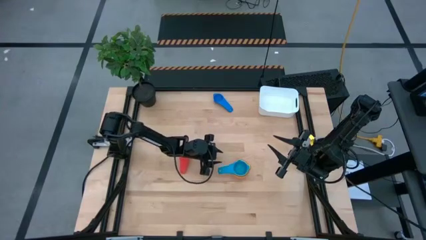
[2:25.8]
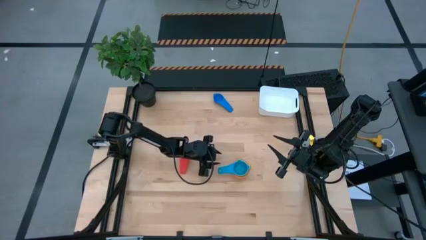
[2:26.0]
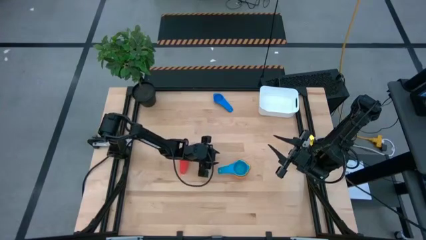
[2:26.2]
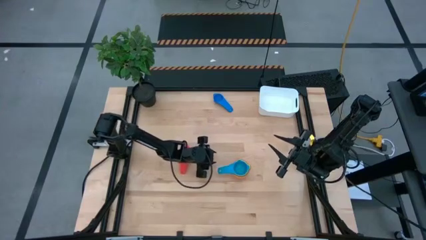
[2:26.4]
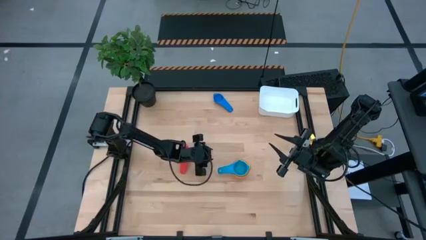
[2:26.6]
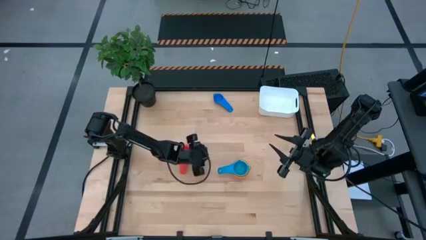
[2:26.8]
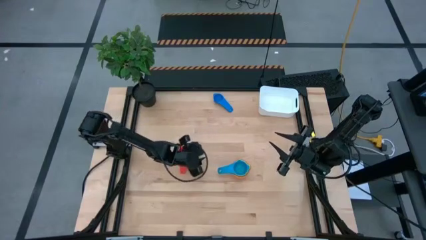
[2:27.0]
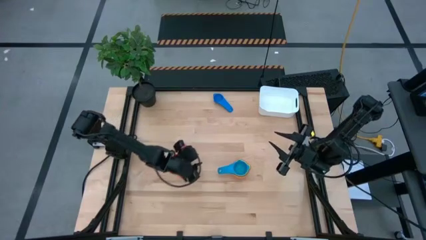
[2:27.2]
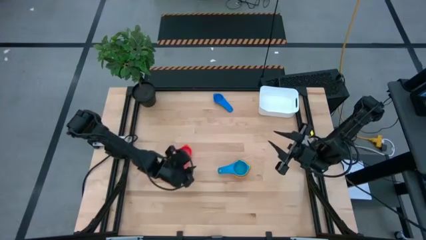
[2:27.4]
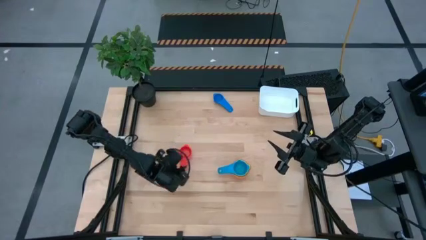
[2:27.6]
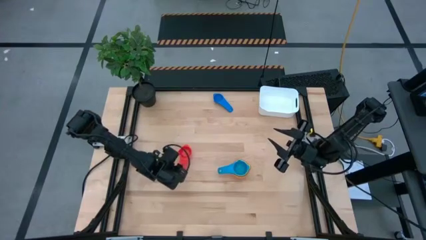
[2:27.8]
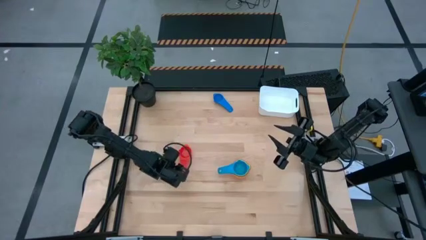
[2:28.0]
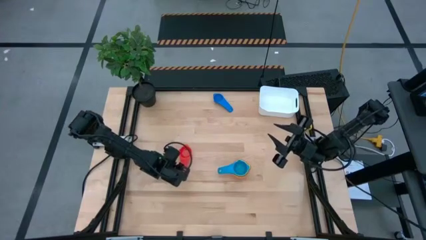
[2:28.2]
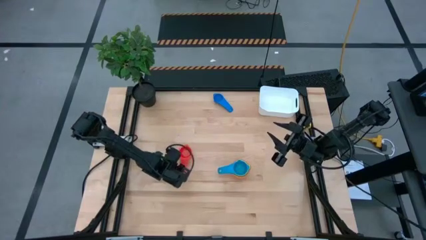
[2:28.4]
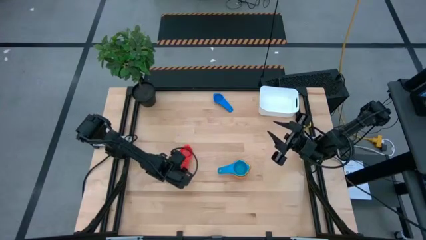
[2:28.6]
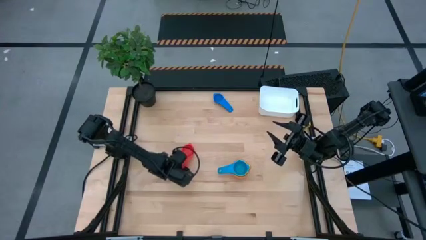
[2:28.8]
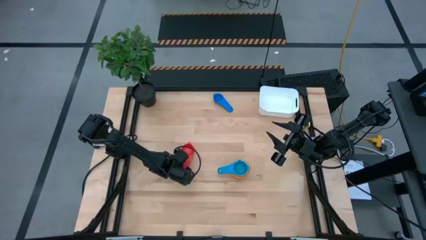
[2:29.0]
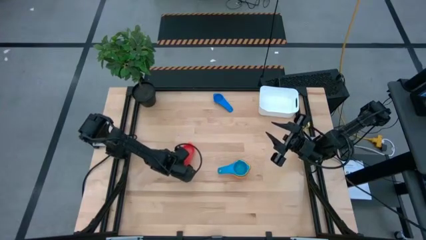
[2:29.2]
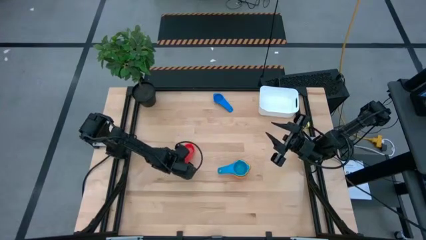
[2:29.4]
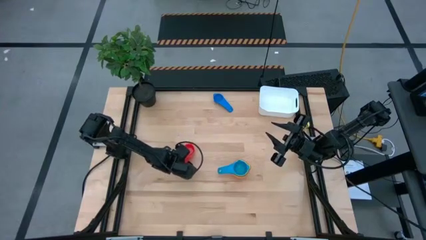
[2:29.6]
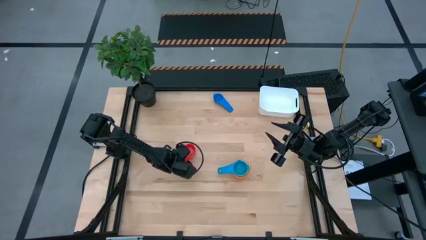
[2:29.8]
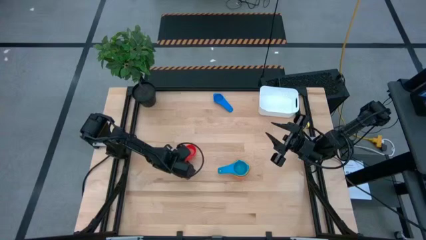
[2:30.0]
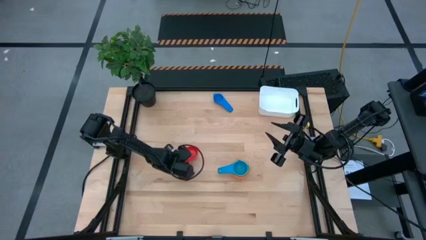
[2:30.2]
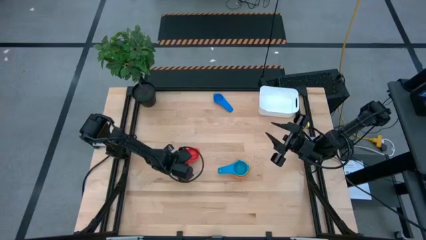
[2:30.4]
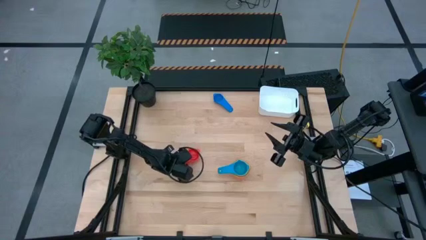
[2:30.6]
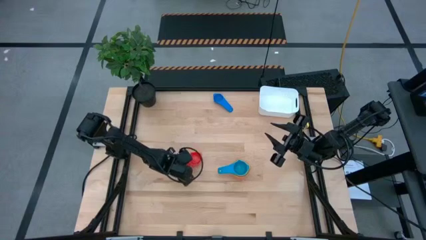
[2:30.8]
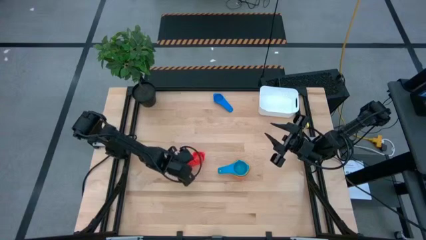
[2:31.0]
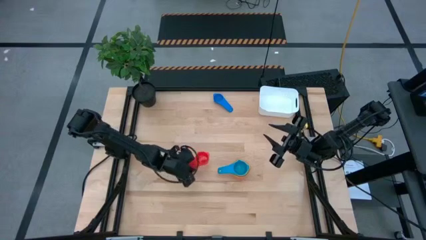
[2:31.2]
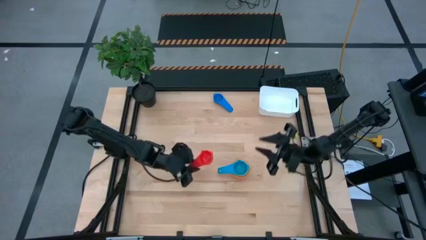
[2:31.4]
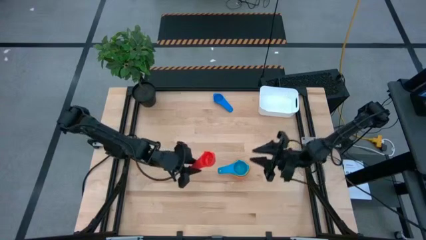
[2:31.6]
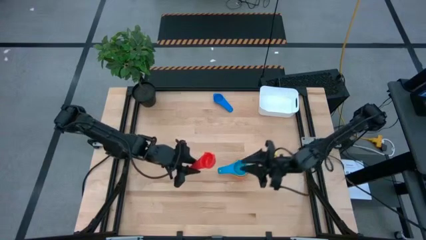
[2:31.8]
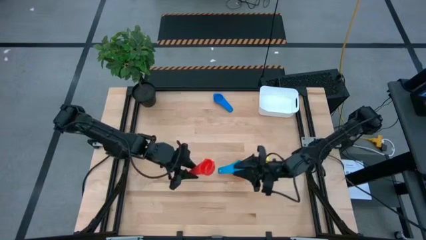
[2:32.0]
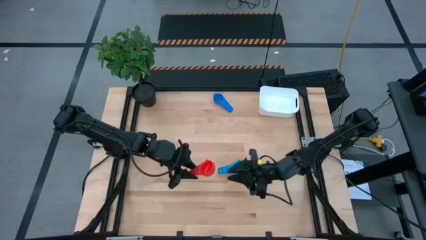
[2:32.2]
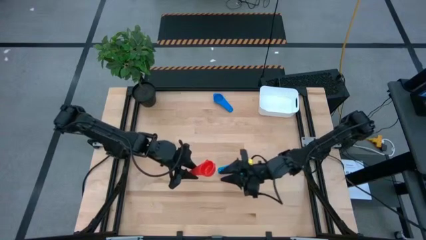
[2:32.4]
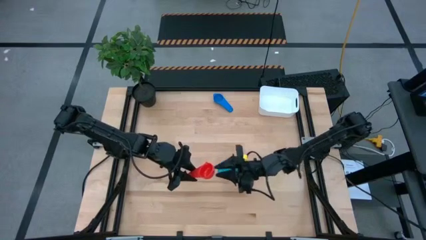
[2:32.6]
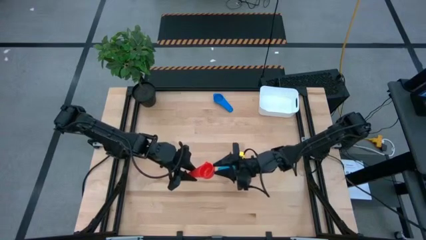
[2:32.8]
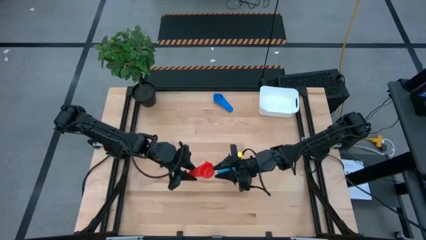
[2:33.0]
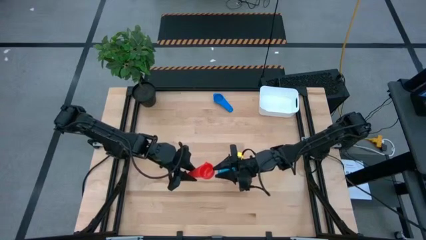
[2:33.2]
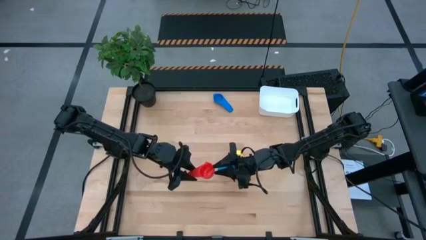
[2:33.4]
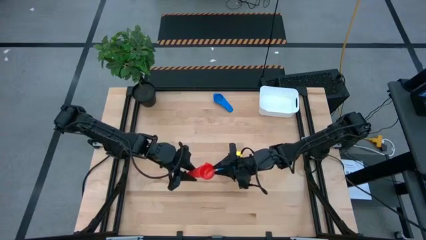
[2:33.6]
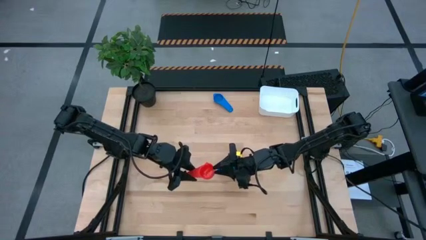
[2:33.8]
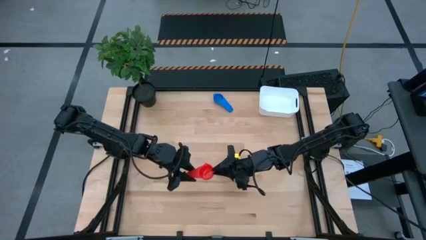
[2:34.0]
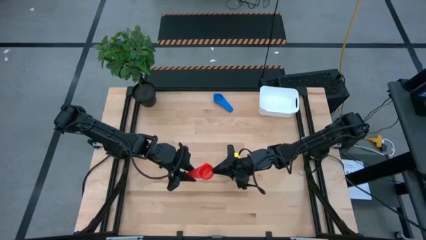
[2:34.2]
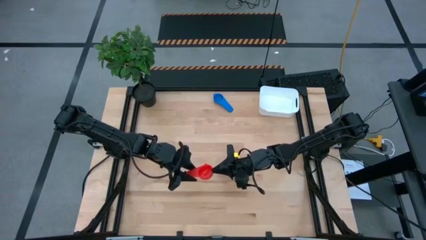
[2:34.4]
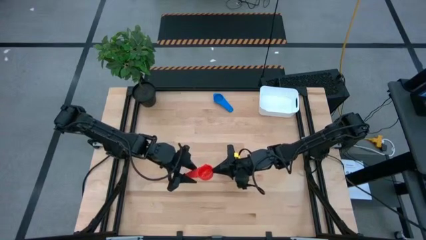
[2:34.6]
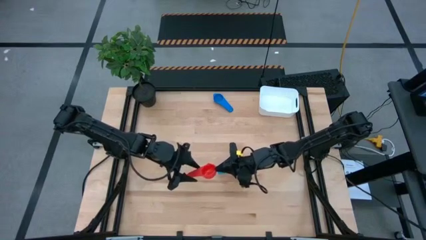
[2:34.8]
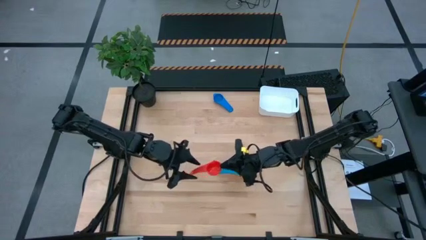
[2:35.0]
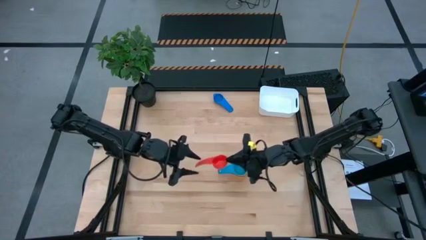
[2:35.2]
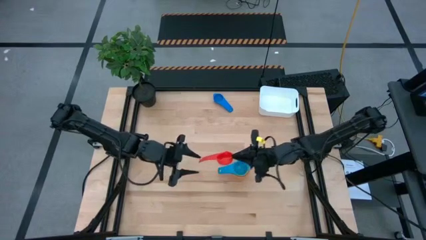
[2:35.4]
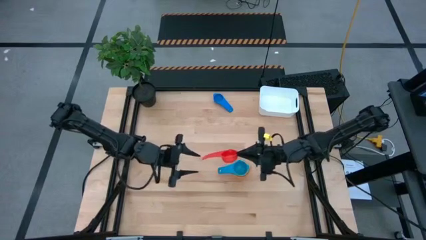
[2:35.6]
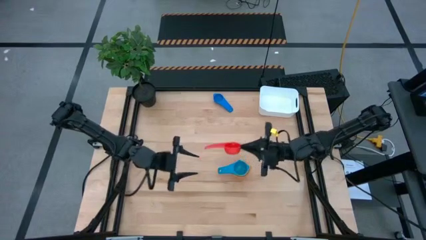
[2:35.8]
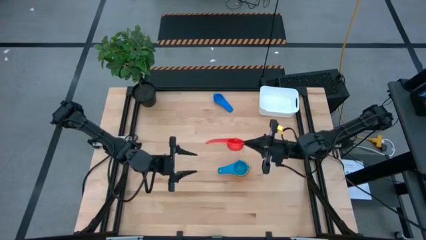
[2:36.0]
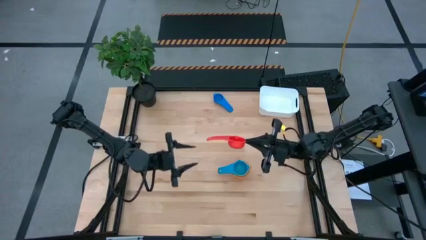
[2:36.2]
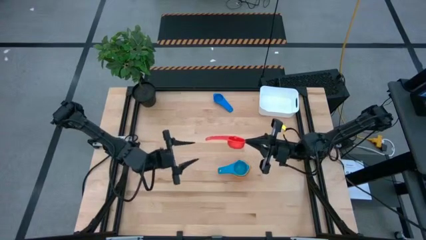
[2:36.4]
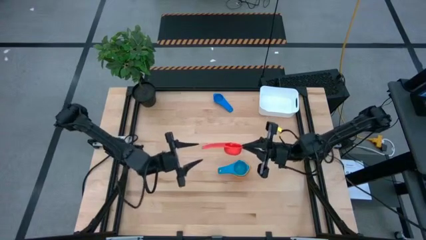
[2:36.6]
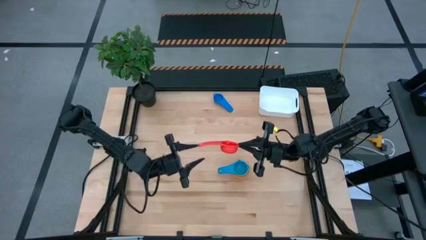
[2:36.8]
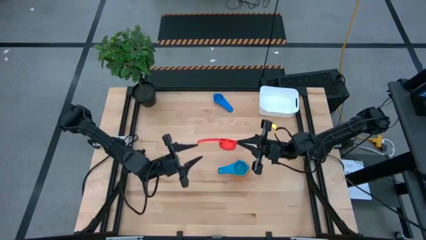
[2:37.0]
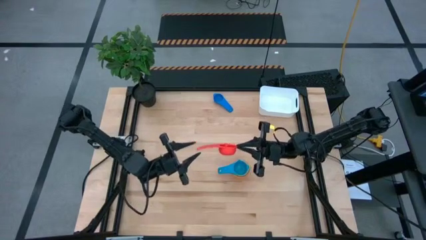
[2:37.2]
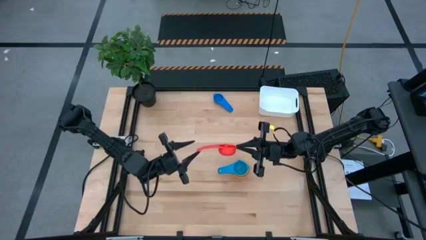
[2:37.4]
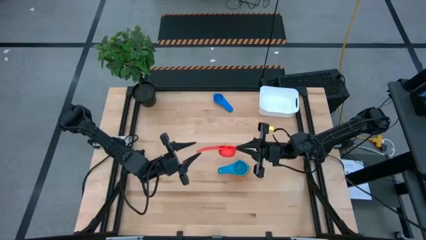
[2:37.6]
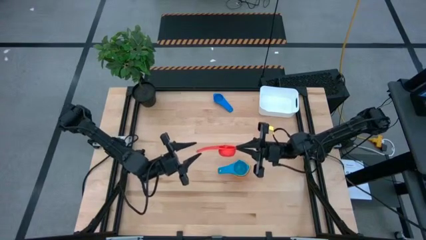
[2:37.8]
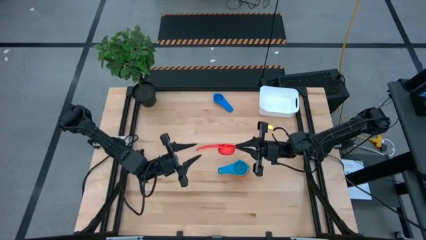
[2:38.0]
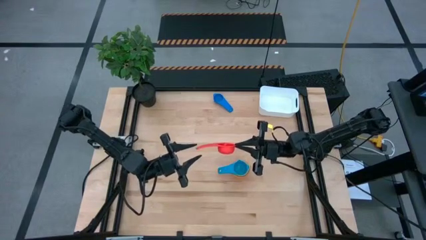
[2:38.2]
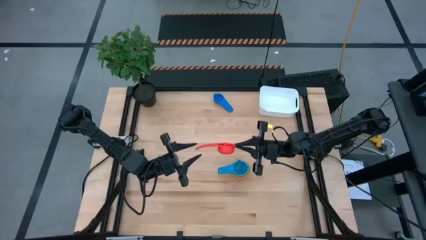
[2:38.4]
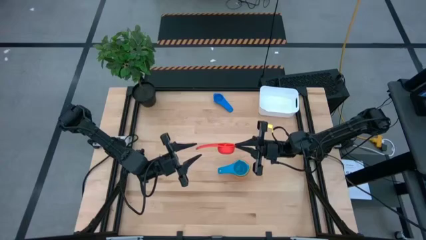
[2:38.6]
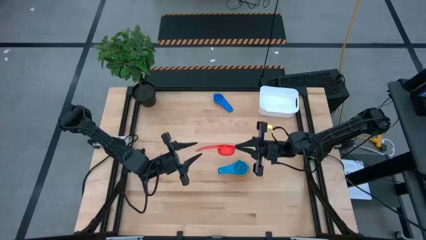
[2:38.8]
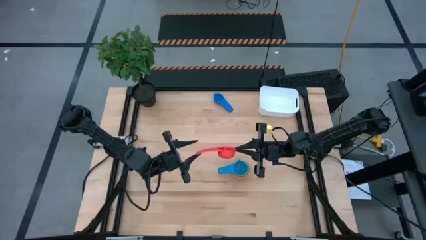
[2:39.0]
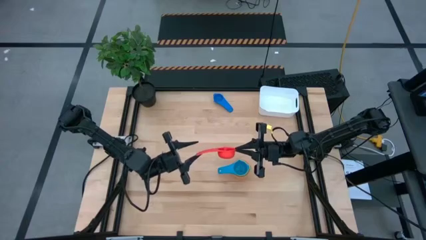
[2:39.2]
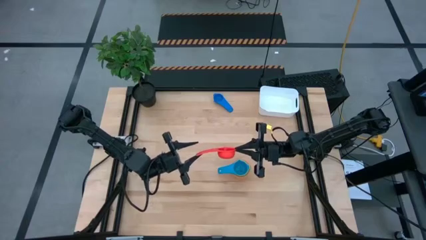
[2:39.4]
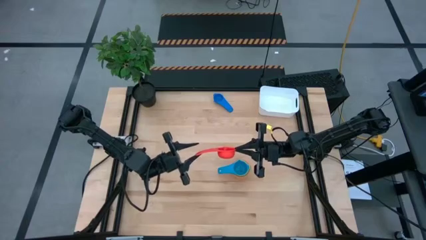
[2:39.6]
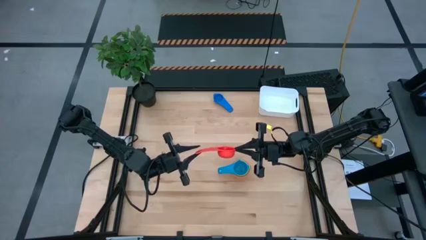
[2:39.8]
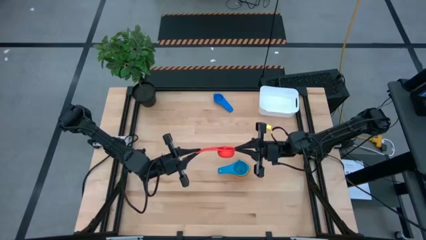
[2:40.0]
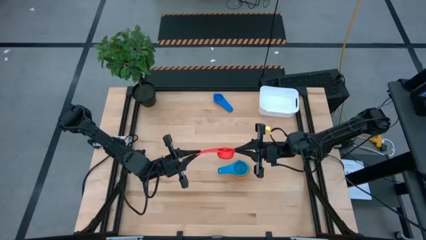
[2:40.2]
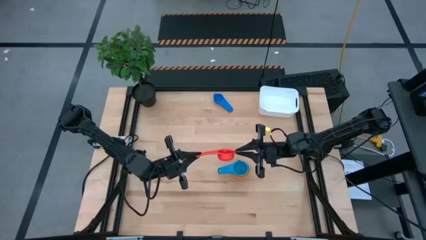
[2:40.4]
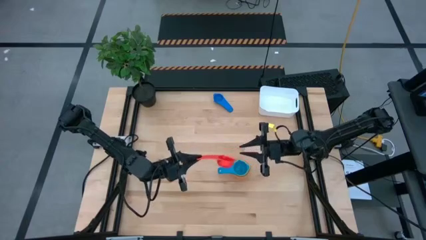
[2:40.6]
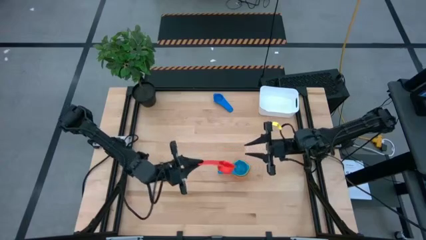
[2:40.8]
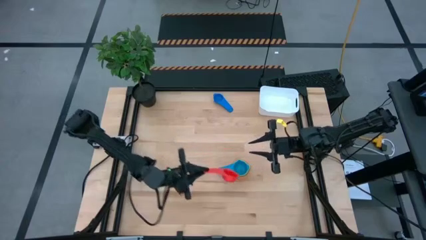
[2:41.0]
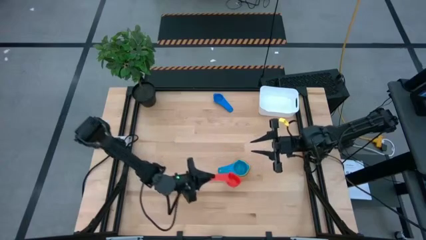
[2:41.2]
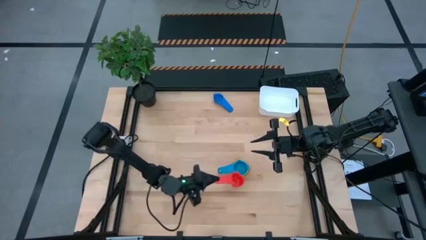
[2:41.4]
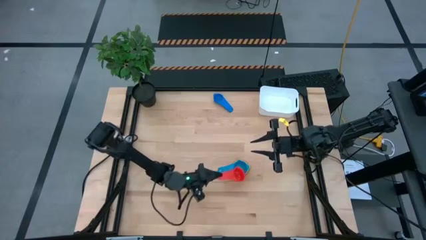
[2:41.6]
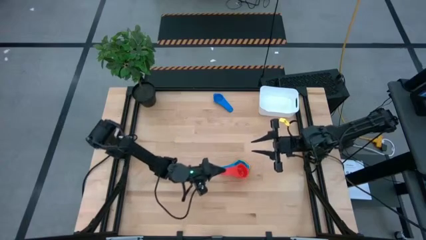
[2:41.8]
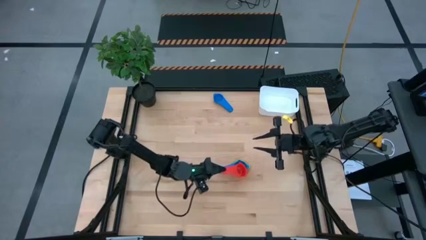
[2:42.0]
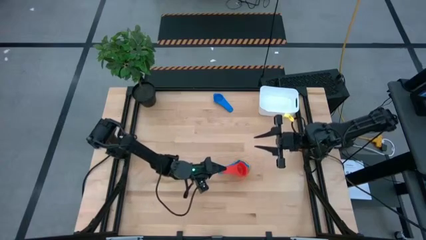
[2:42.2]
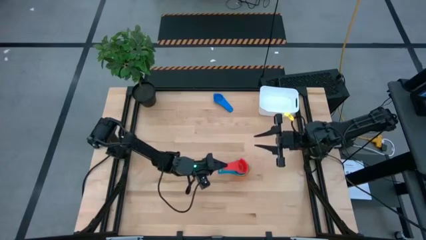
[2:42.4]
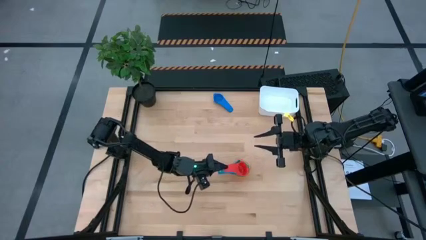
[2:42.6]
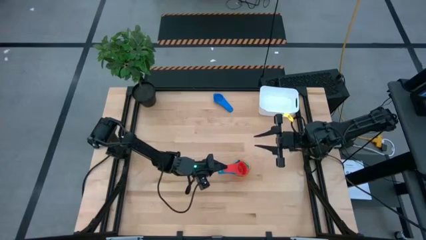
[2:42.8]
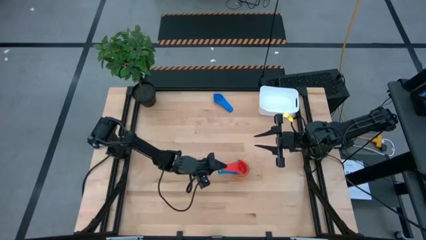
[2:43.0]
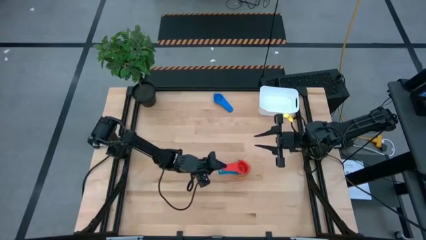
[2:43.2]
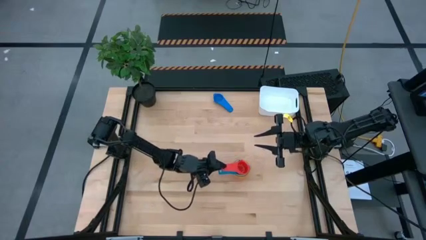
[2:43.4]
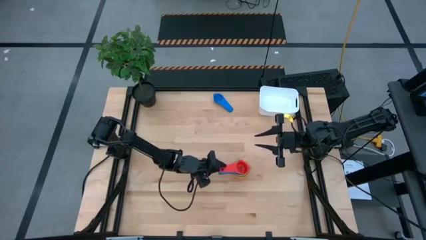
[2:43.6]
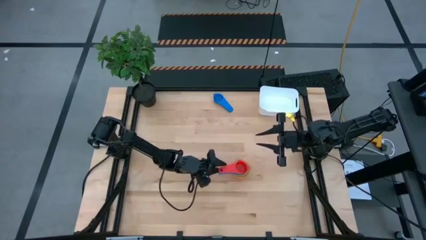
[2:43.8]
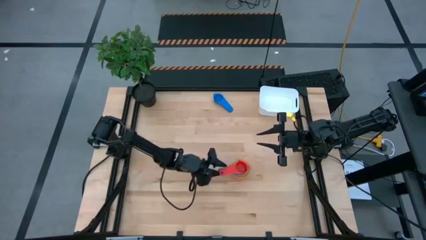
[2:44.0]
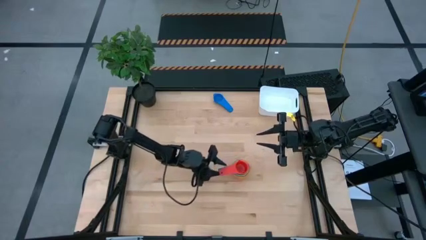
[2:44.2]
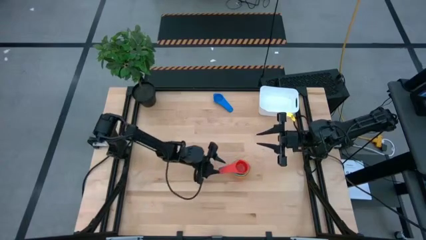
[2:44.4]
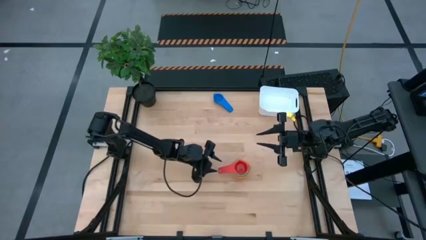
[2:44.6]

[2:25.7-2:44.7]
Task: Nest measuring cups in basket
Stack the red measuring cup on top of the light blue measuring cup
